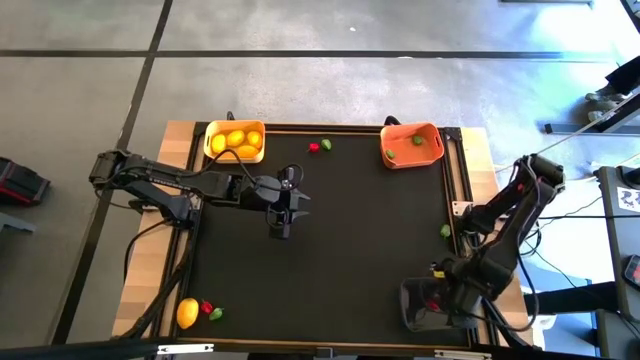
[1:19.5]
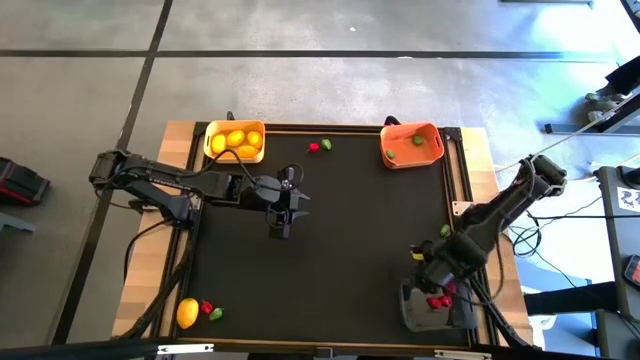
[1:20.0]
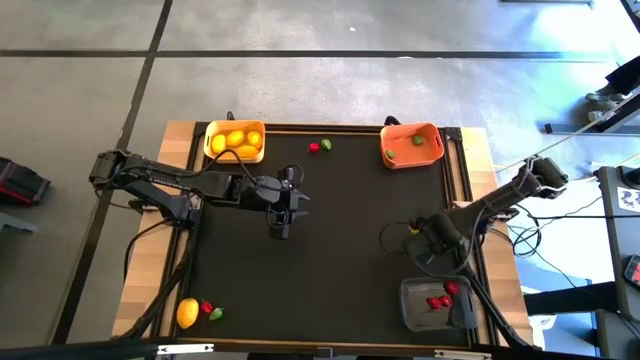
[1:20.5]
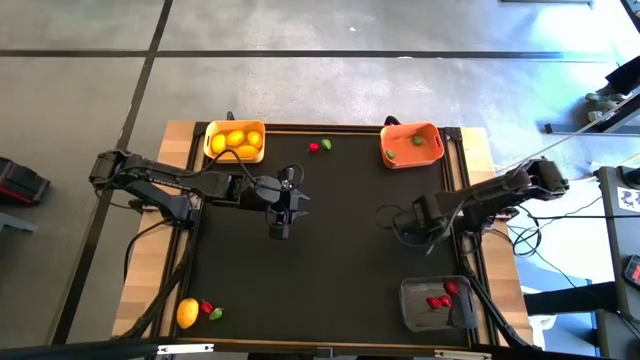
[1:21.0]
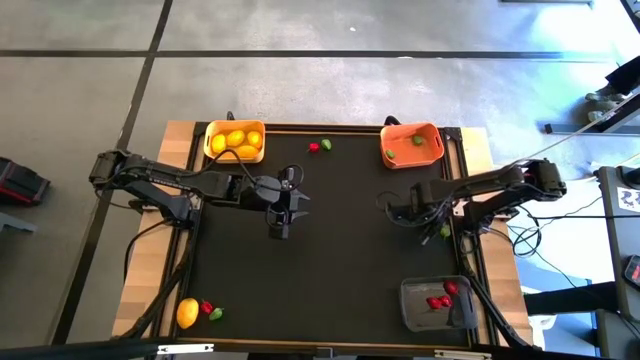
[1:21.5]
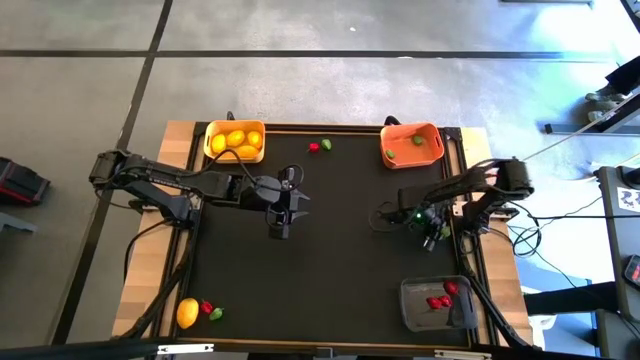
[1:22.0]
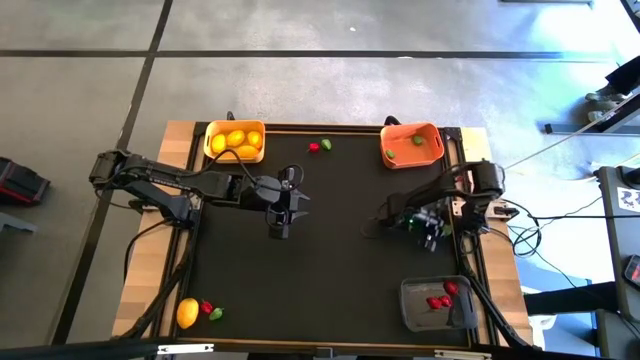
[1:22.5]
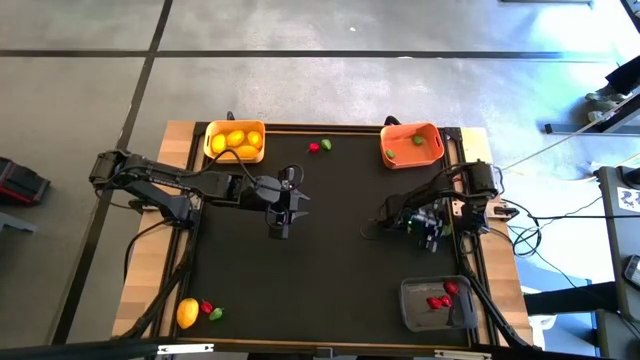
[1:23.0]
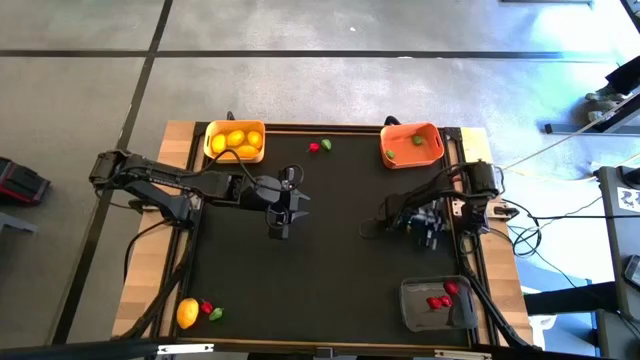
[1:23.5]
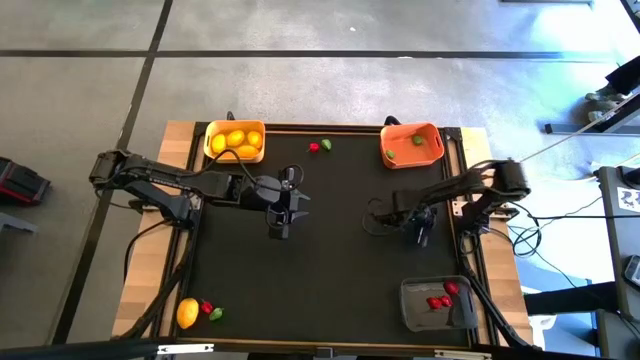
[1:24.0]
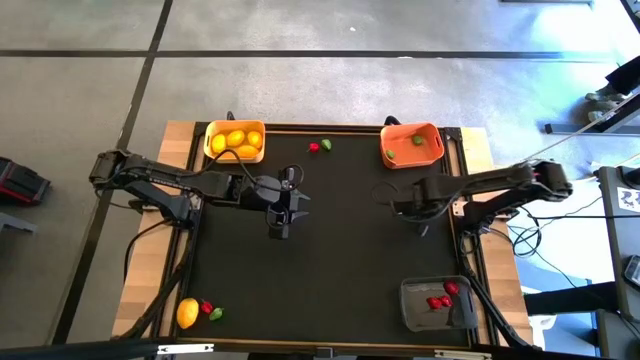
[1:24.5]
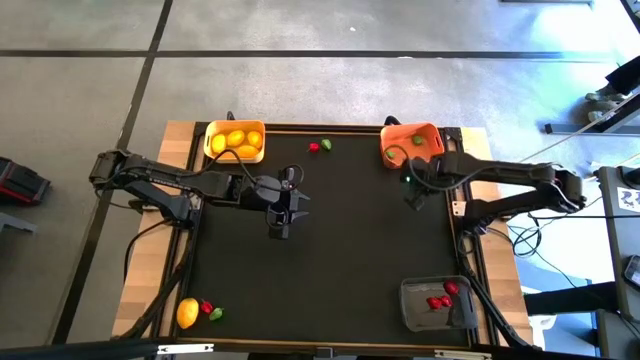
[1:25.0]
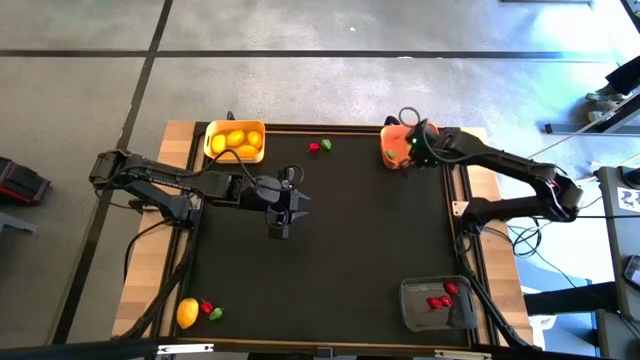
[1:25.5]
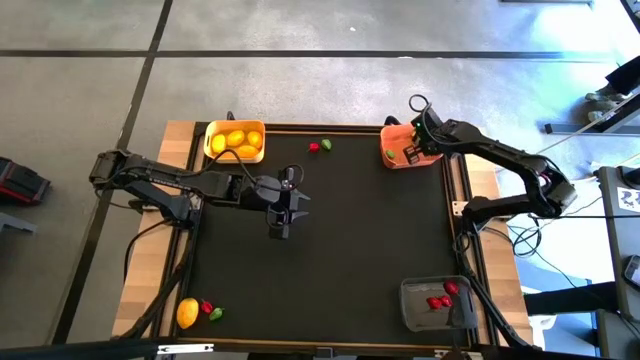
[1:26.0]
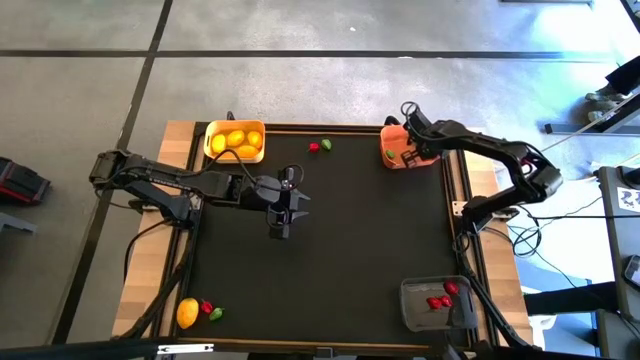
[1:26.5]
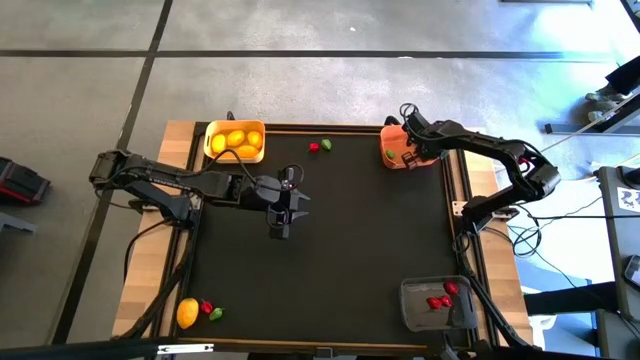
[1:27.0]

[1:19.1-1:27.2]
Task: Sort produce into baskets
Put the green chili pepper into the orange bin

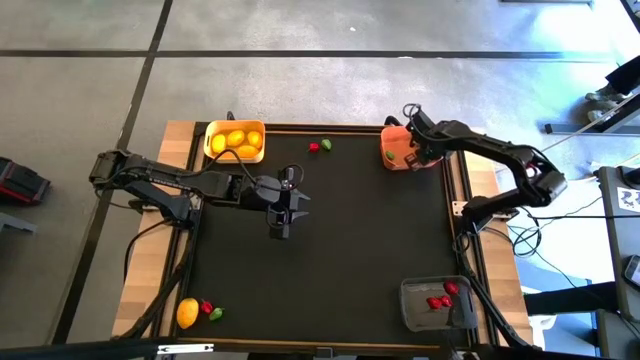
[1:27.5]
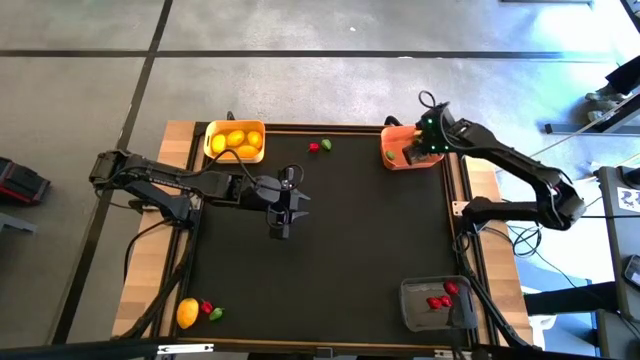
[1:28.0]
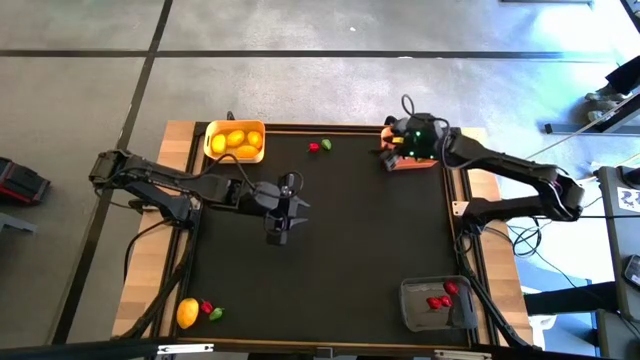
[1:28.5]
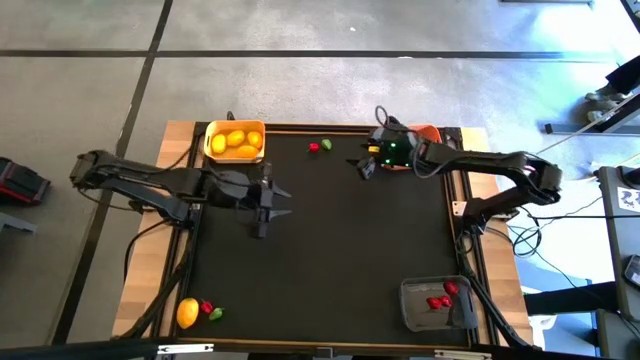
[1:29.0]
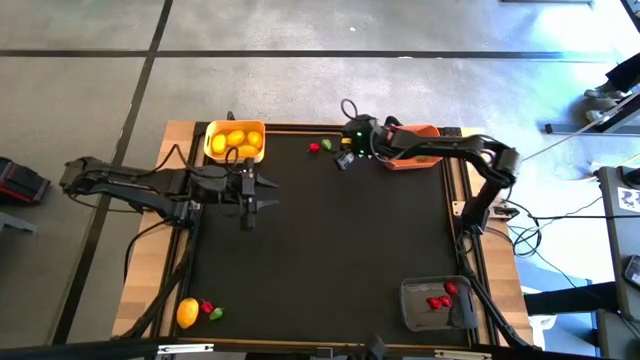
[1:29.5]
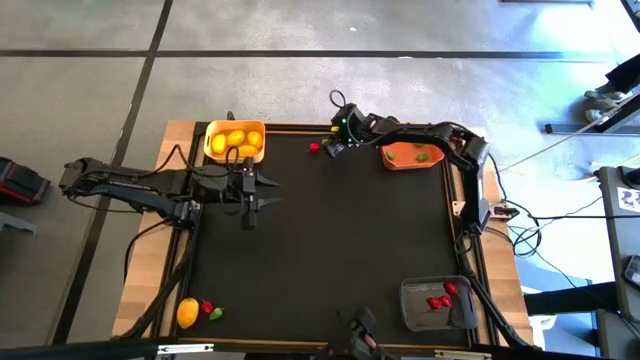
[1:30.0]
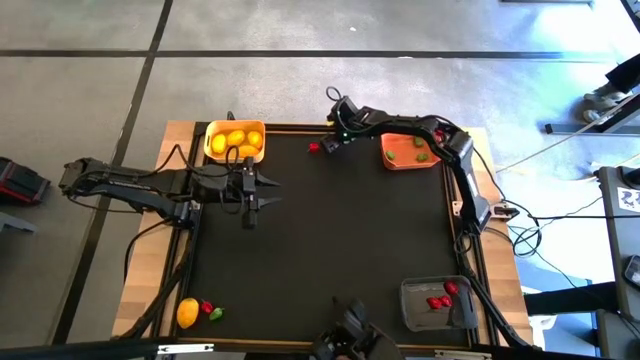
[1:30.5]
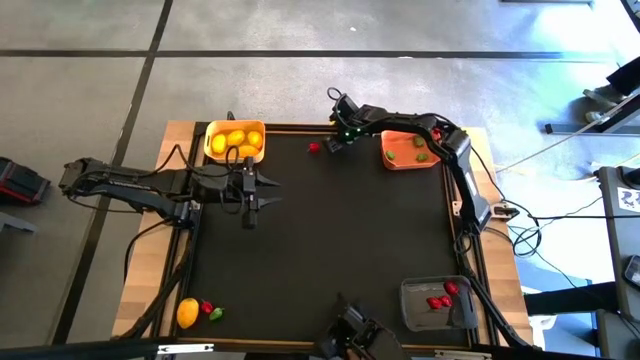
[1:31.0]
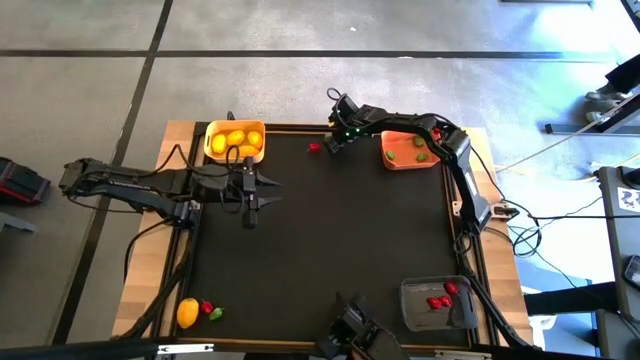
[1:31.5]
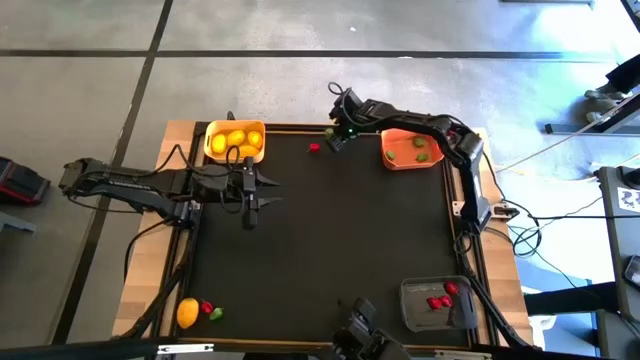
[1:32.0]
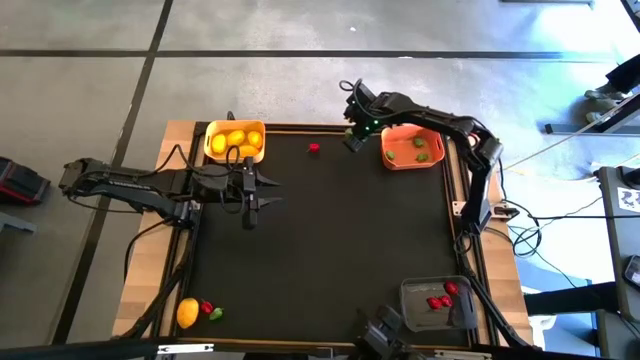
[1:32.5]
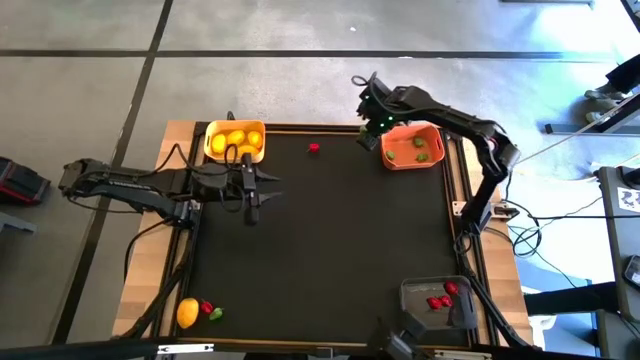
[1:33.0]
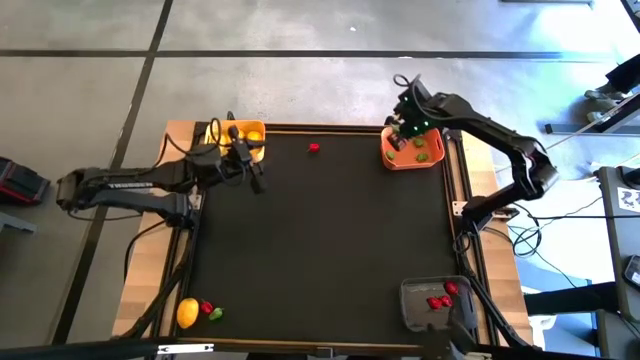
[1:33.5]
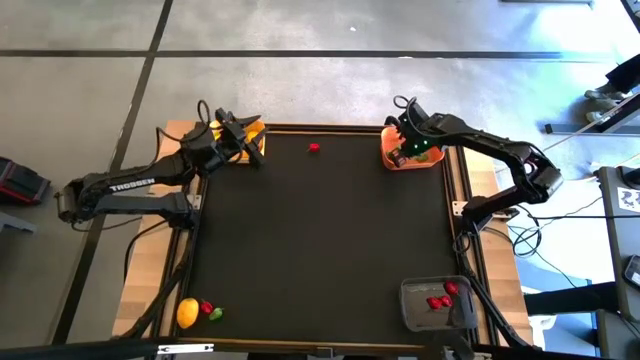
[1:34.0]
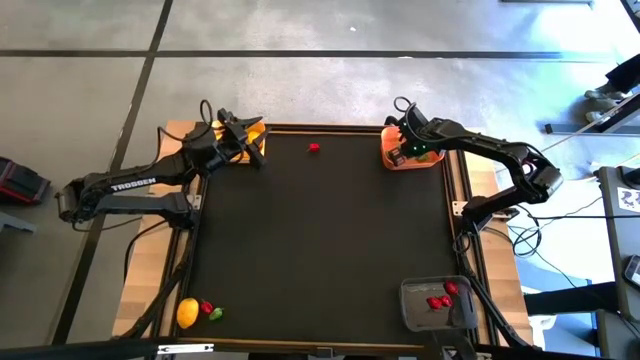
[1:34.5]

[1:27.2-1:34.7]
Put the green chili pepper into the orange bin

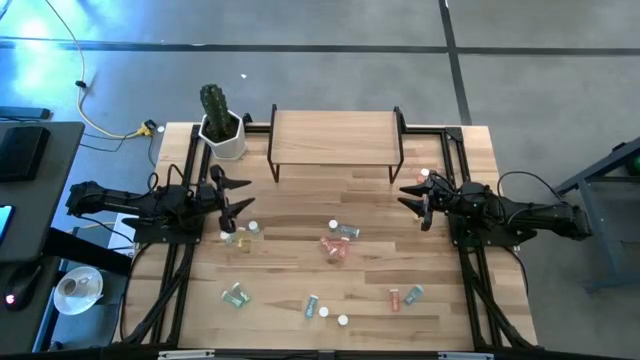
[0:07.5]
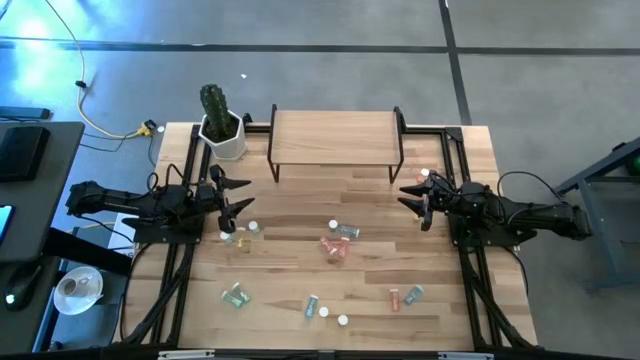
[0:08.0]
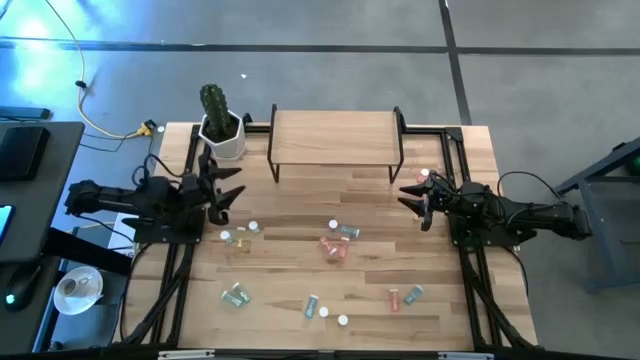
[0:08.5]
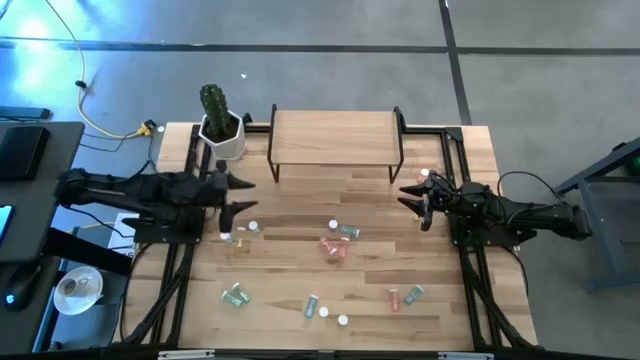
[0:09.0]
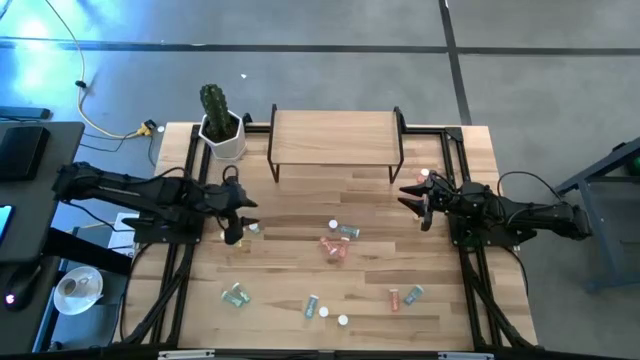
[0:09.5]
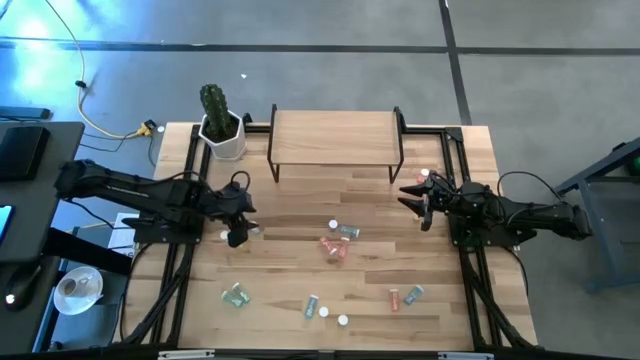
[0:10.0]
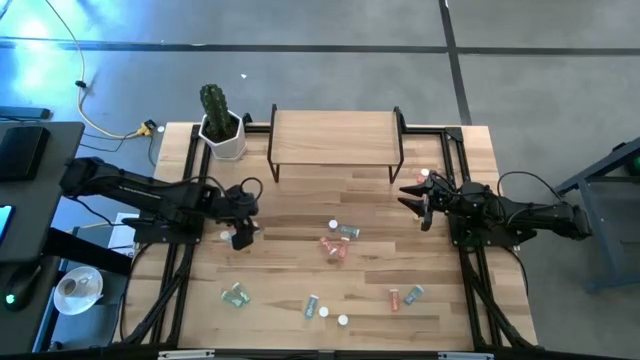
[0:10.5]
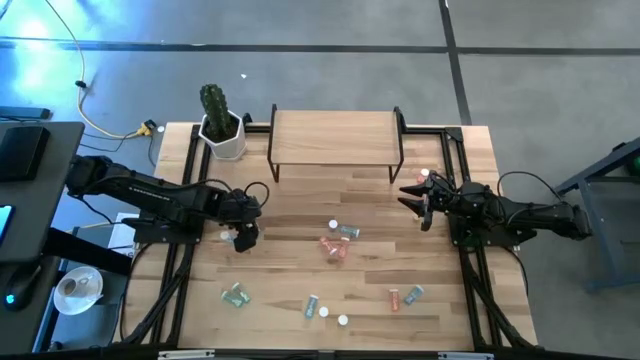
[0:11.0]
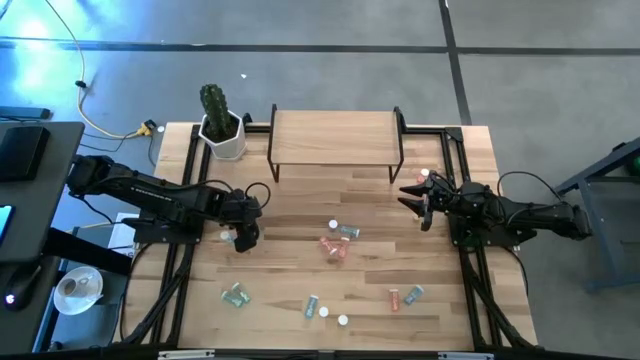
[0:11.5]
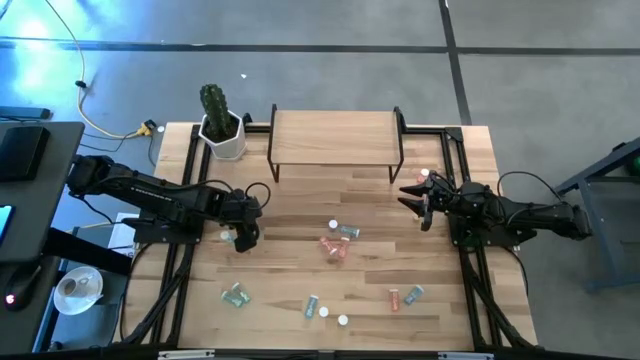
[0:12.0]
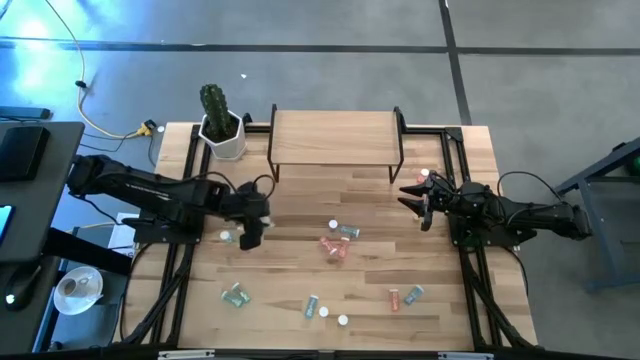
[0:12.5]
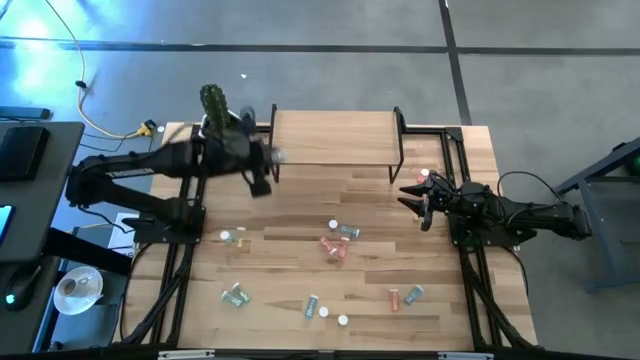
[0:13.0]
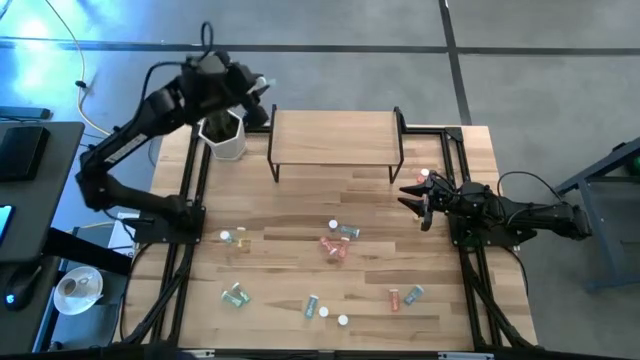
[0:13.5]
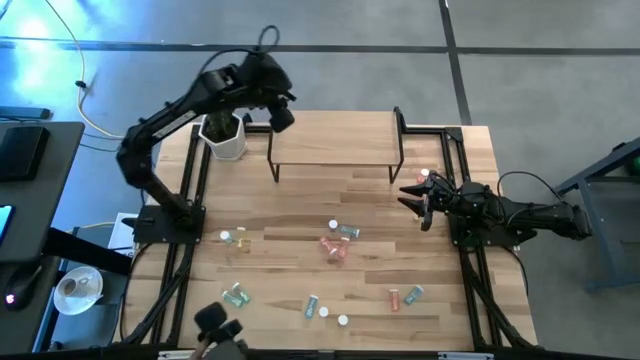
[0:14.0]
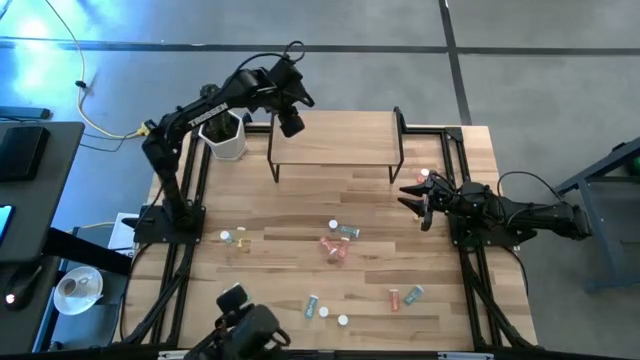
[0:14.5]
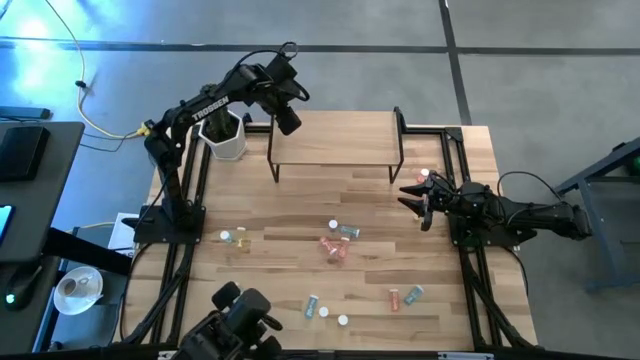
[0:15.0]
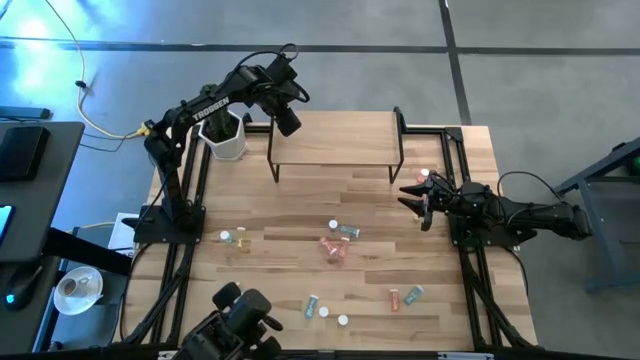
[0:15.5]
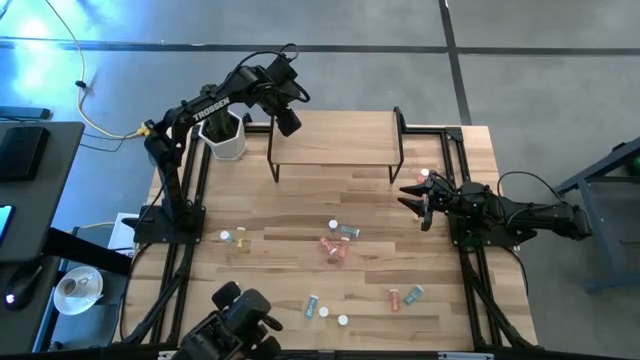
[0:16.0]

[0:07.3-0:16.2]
Task: Pick and place medicine bottles onto shelf by color
Put the light blue pill bottle on the shelf
